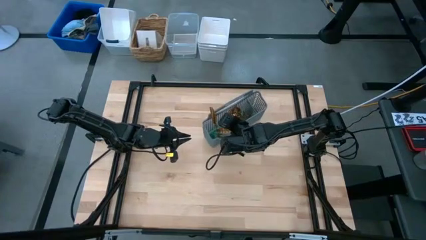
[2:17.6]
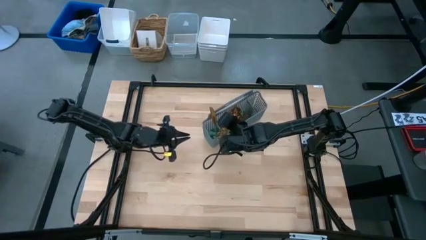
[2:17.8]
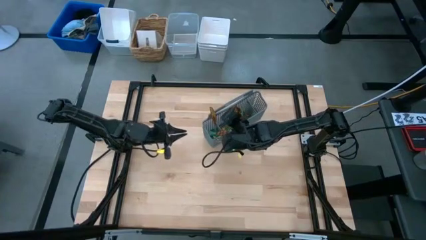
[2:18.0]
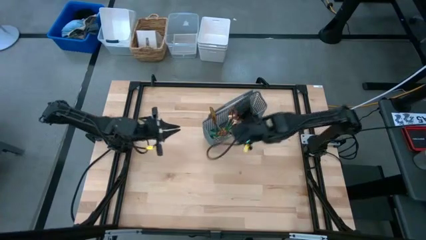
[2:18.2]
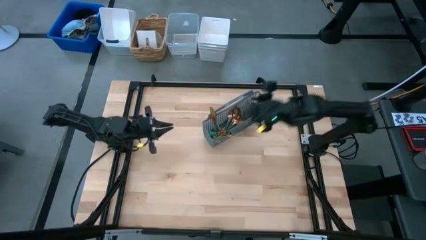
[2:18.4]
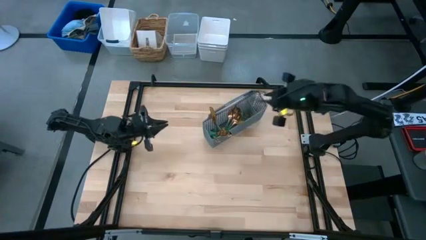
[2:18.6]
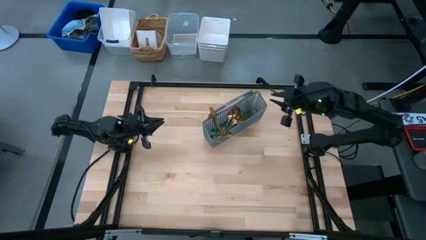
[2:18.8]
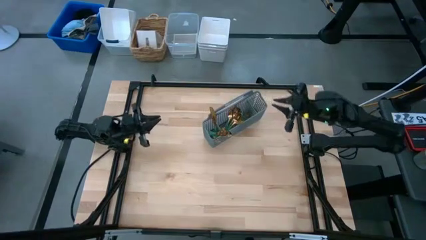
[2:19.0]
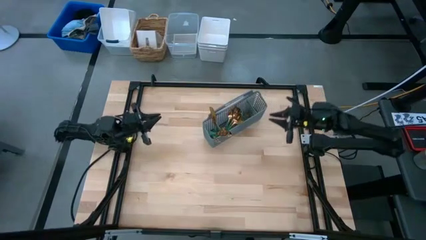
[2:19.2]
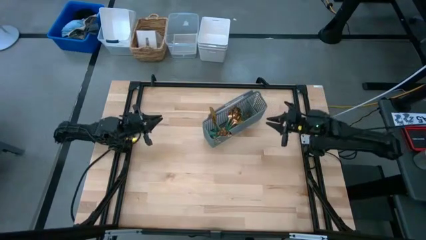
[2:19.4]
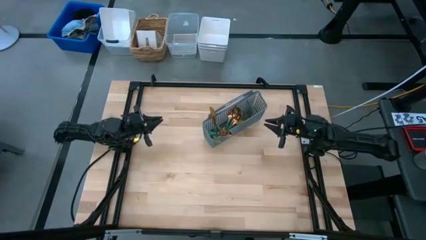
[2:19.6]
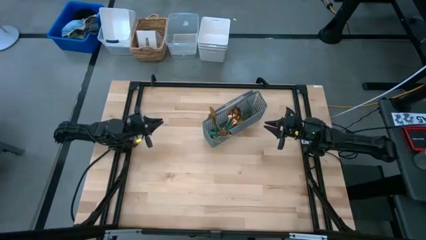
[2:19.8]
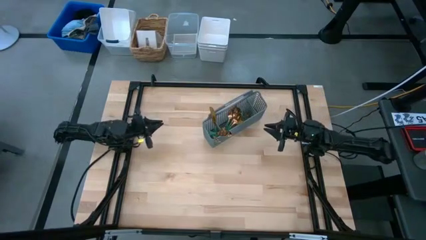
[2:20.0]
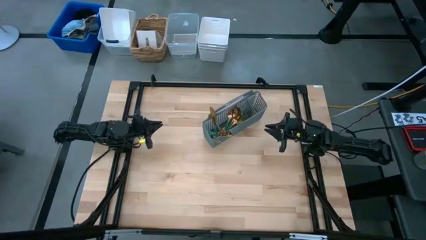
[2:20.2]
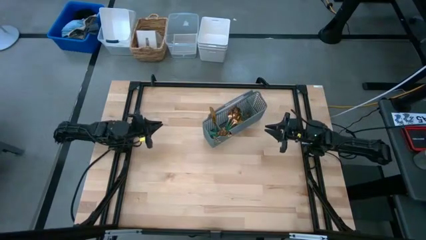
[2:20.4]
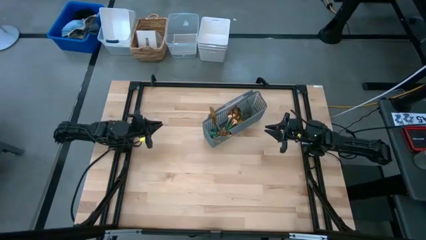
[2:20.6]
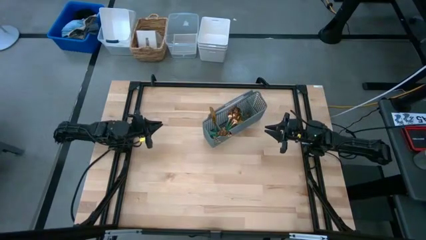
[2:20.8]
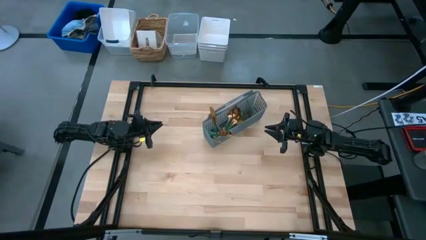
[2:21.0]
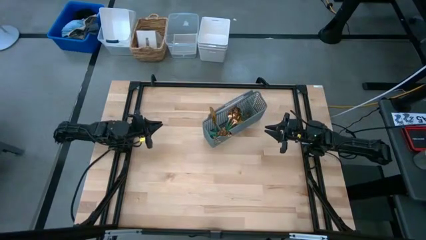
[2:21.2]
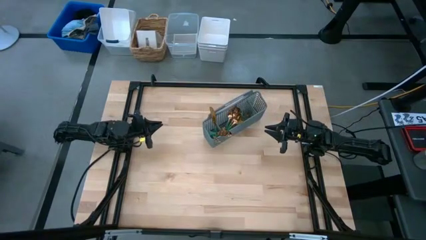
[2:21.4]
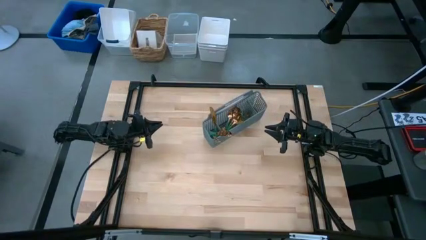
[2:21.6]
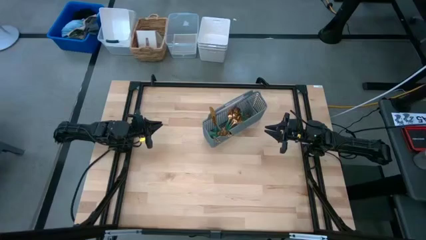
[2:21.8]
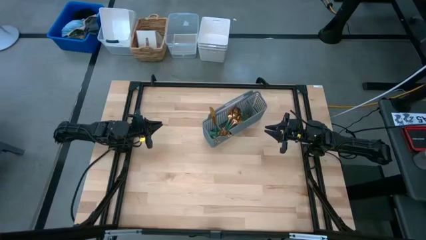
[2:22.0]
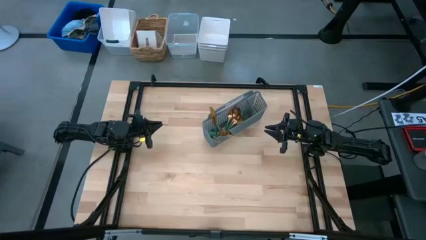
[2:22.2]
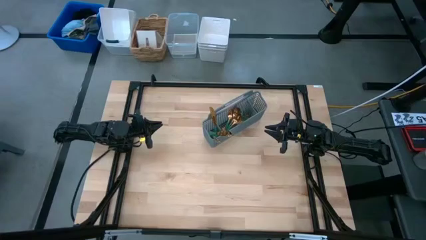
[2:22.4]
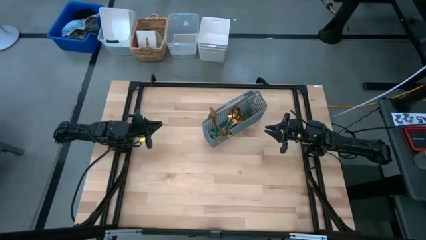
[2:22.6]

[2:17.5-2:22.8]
Task: Sort silverware
Return to Home Position

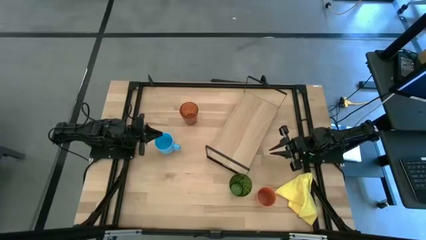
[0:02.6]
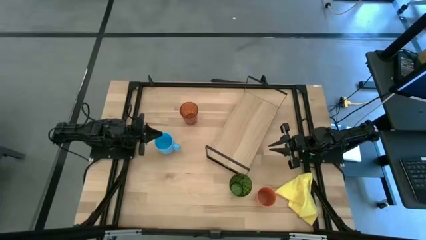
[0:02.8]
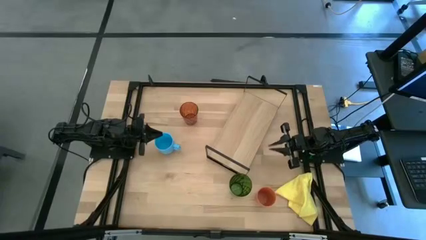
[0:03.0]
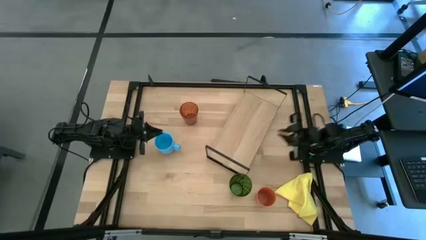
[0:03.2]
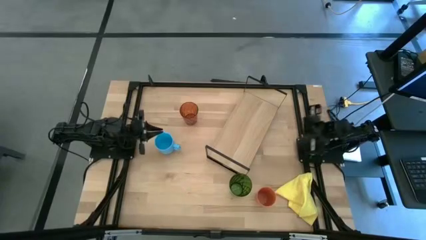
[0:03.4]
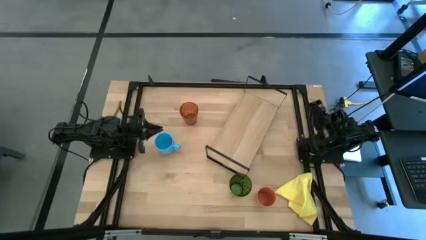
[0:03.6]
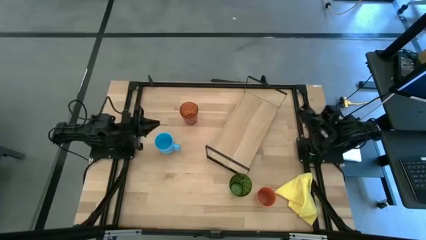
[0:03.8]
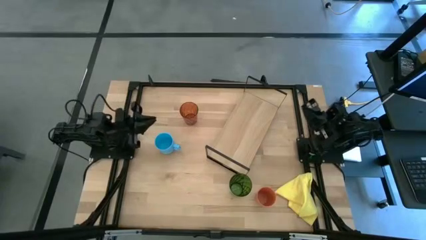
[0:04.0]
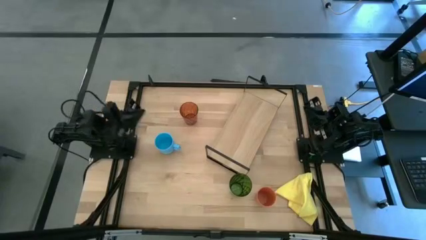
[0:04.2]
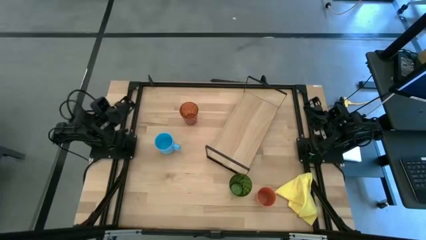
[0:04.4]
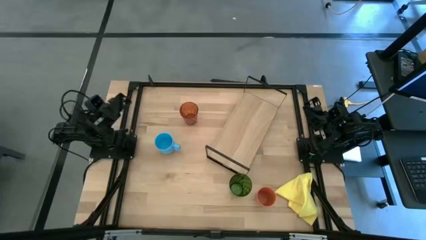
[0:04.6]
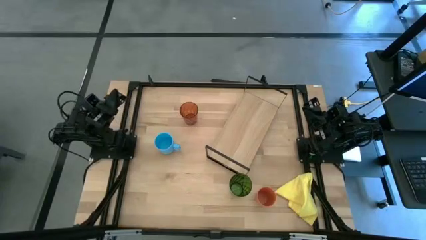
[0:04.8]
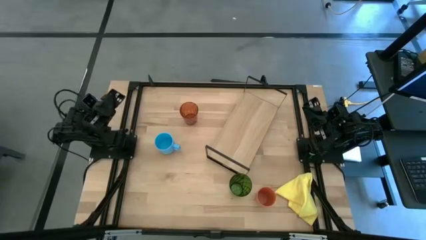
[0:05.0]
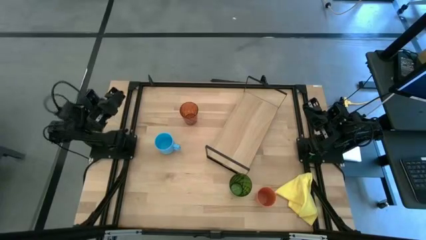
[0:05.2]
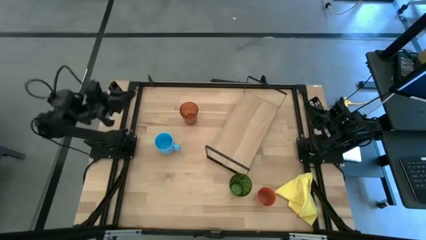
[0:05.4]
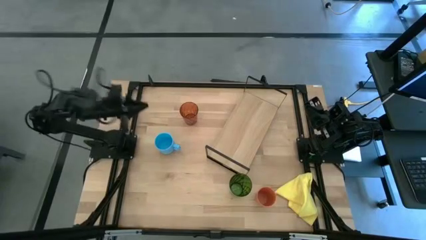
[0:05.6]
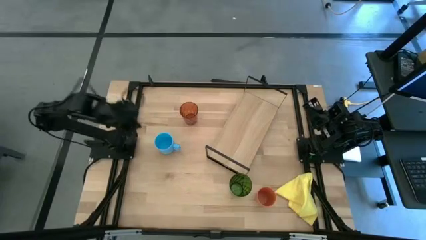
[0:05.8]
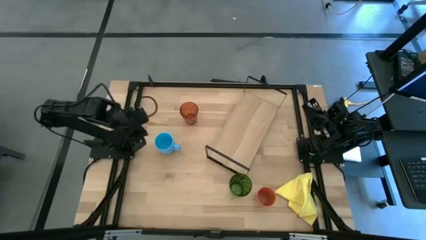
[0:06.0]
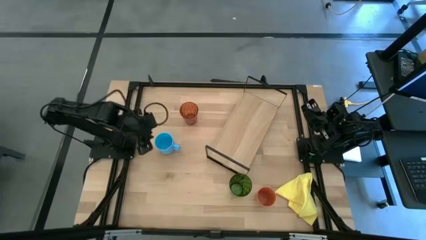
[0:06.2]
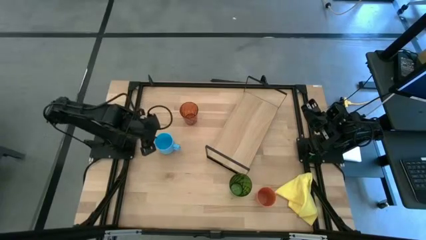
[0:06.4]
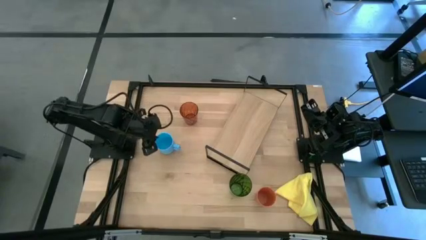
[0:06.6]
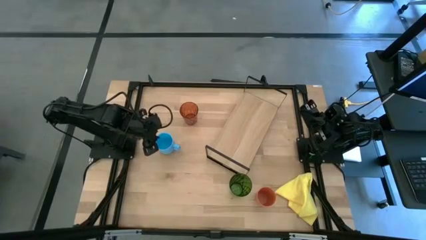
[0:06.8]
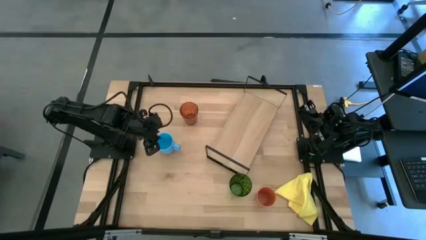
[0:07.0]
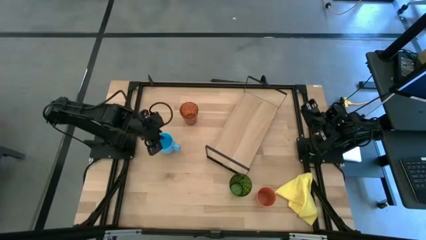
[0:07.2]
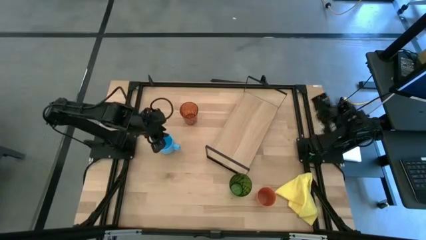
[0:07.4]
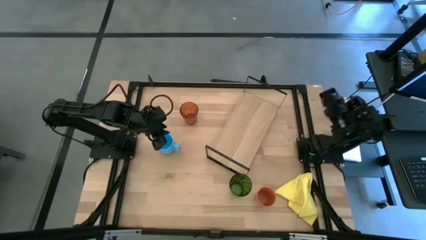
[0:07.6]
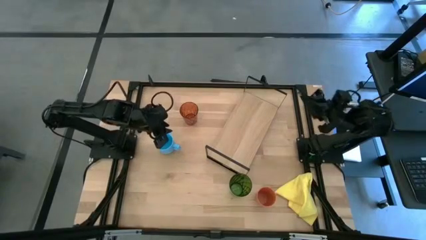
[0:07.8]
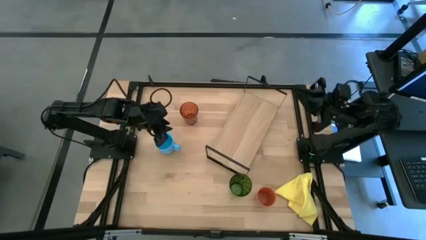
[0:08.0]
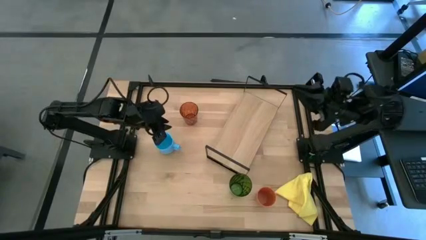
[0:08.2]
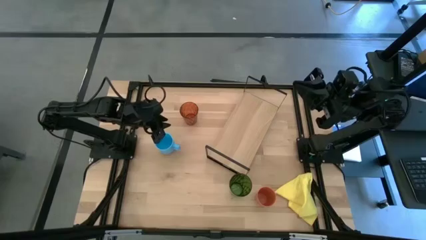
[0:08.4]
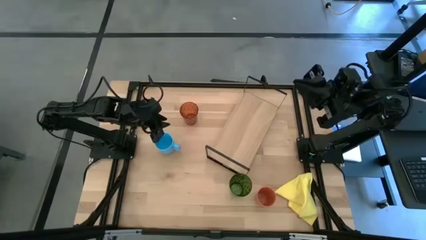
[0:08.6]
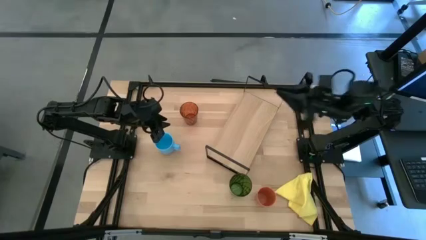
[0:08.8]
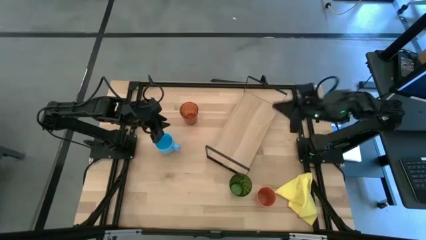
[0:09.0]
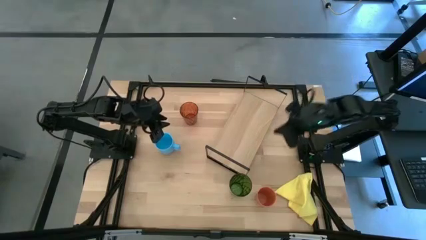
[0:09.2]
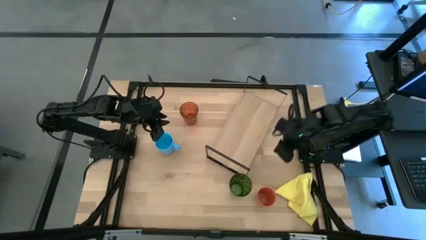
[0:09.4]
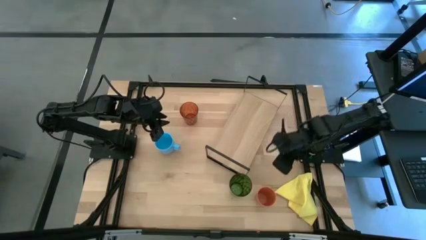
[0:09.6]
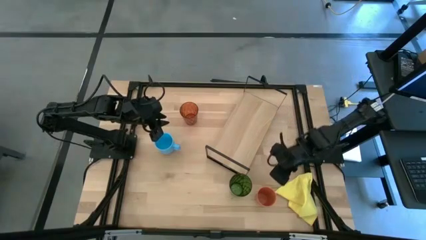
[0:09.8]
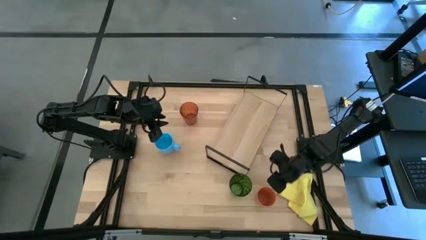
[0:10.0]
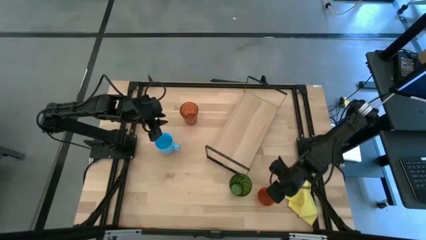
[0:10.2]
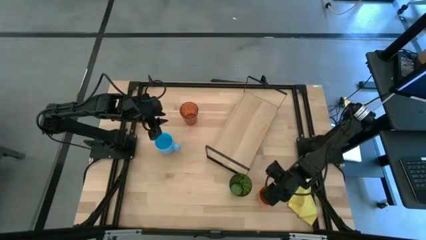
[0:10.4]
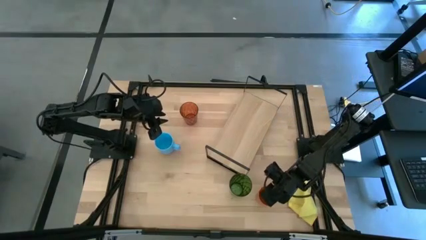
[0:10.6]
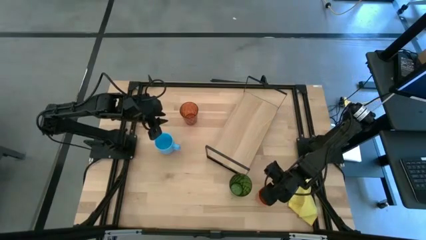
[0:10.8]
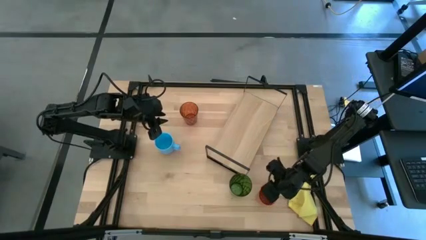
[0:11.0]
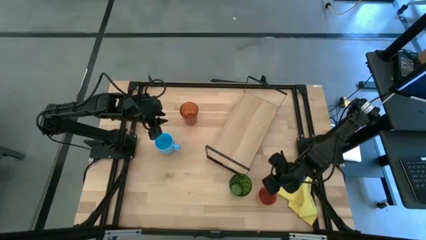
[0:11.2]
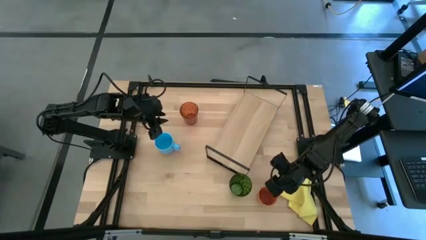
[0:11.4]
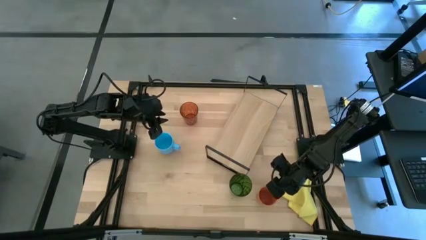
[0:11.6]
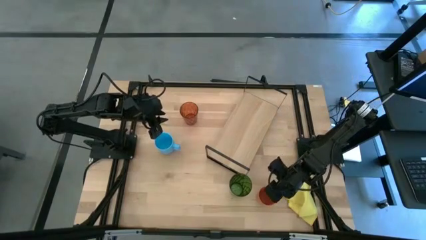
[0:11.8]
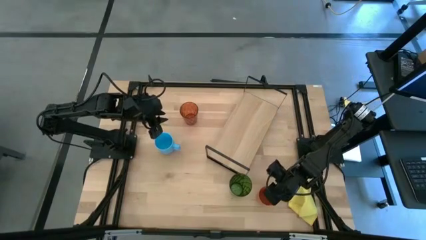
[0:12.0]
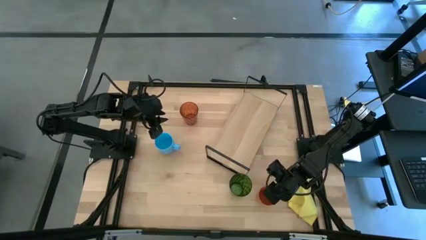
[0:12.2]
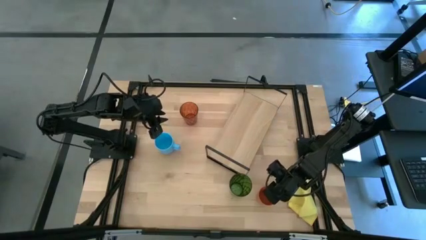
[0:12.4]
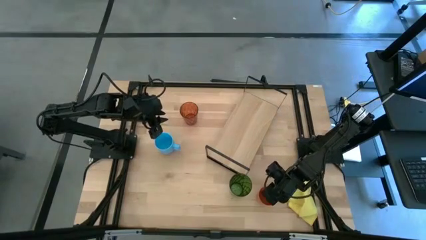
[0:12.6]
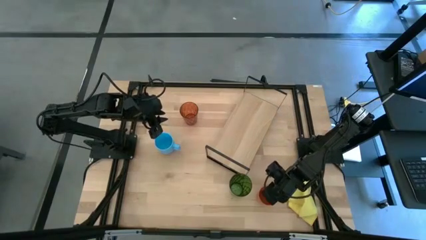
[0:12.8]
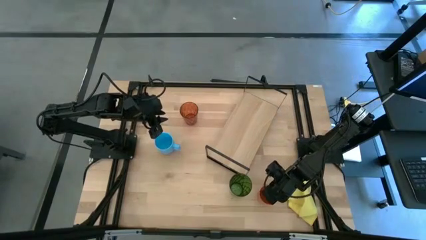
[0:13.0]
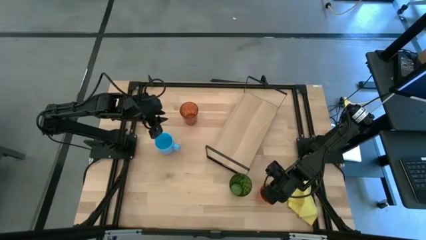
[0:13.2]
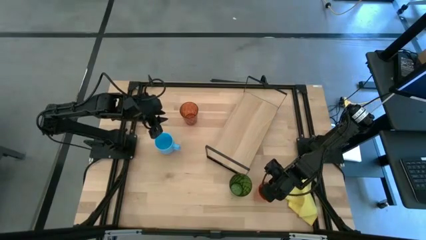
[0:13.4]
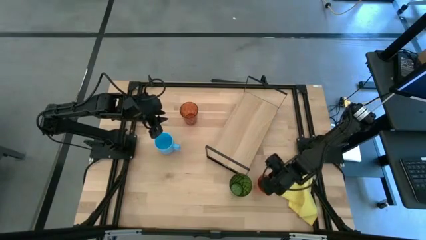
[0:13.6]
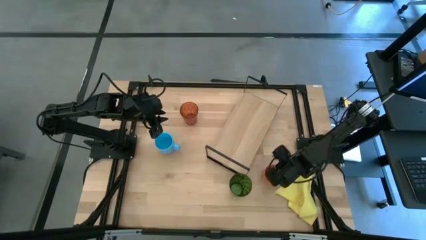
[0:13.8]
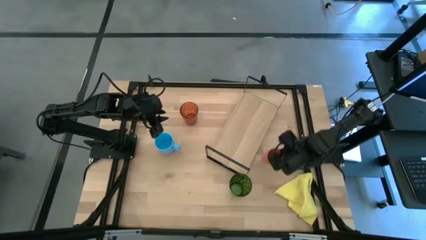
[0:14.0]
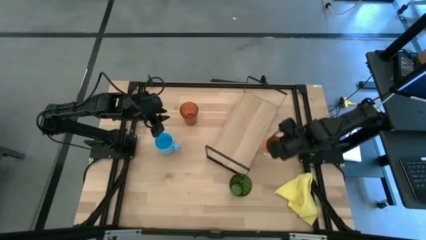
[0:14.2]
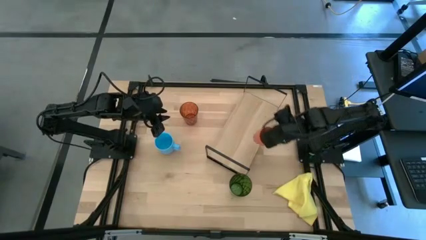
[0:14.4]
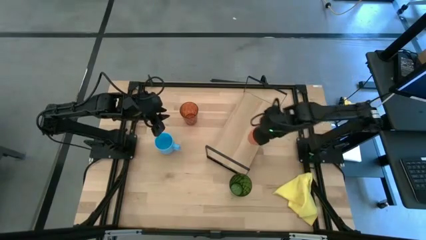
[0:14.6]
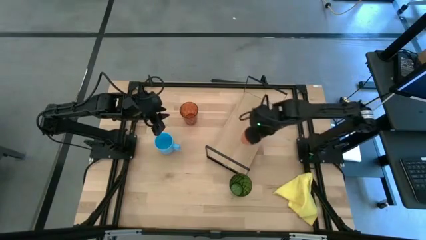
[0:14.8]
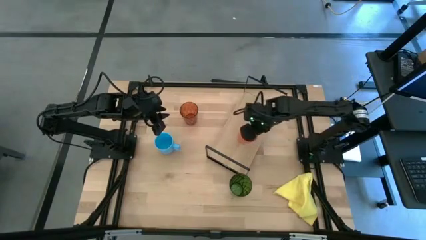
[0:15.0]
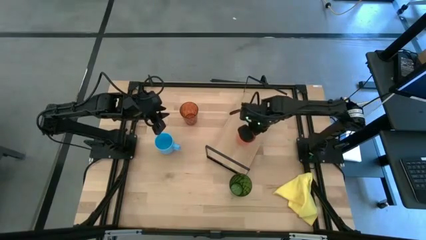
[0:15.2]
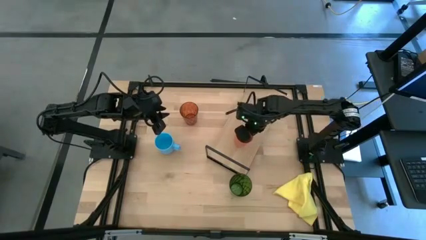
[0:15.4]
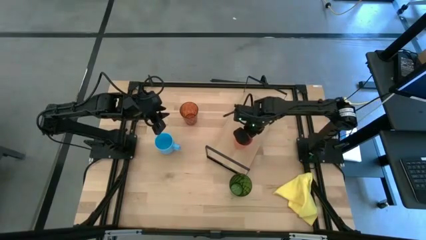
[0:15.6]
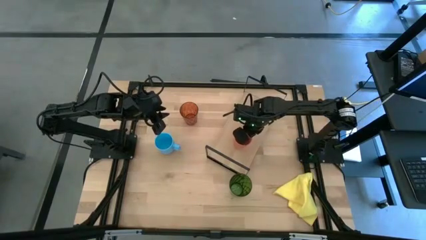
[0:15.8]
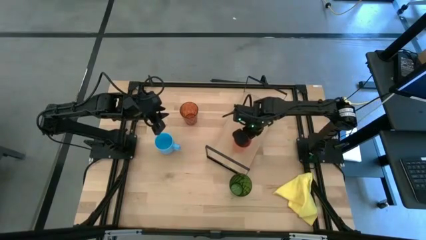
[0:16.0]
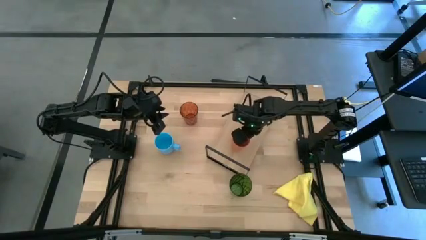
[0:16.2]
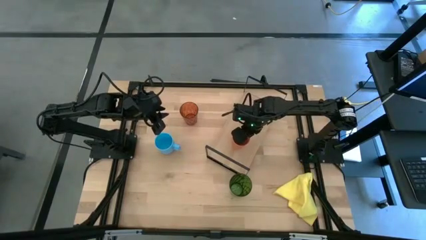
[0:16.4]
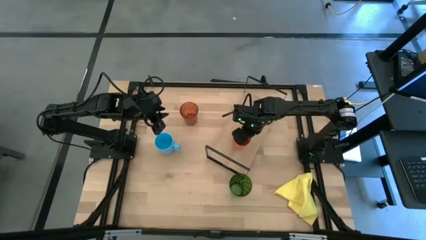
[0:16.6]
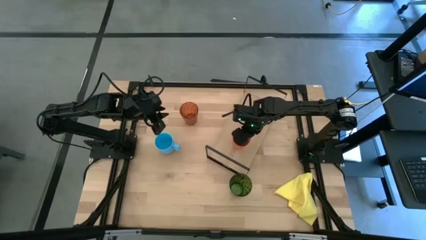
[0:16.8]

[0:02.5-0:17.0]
Task: Stack small to large cups/mugs on shelf
Put the orange cup on the shelf
